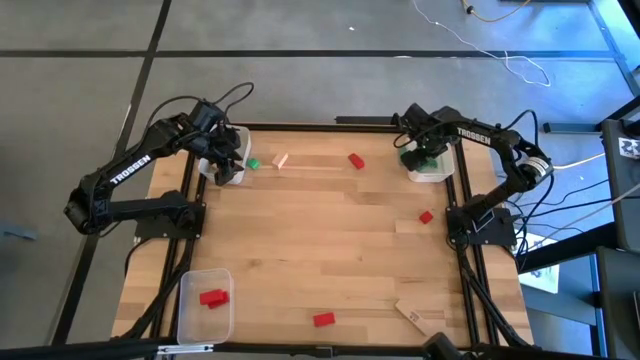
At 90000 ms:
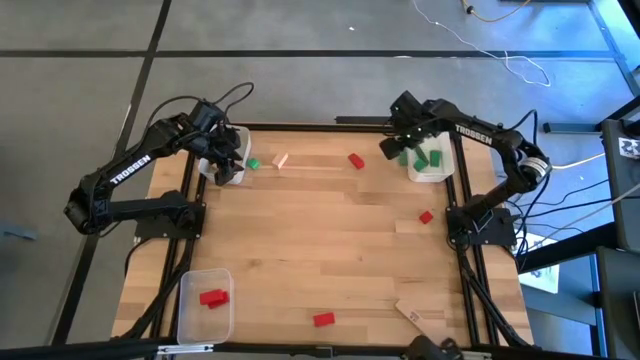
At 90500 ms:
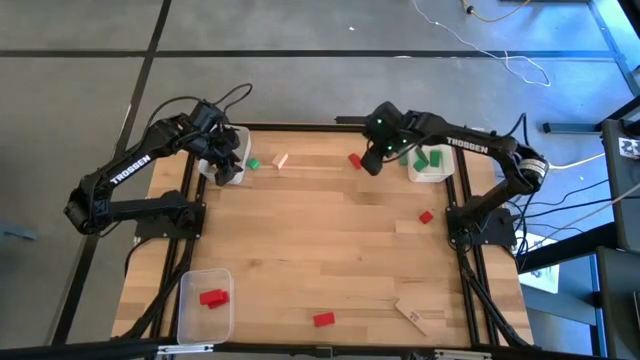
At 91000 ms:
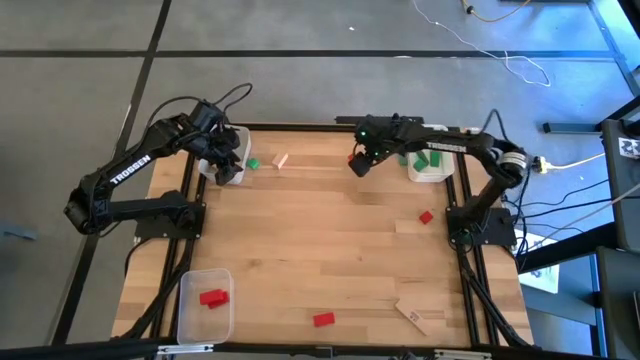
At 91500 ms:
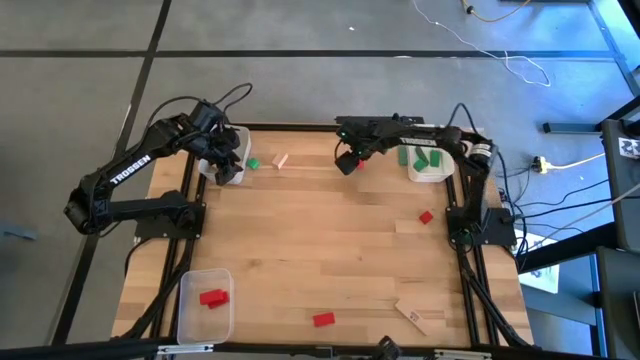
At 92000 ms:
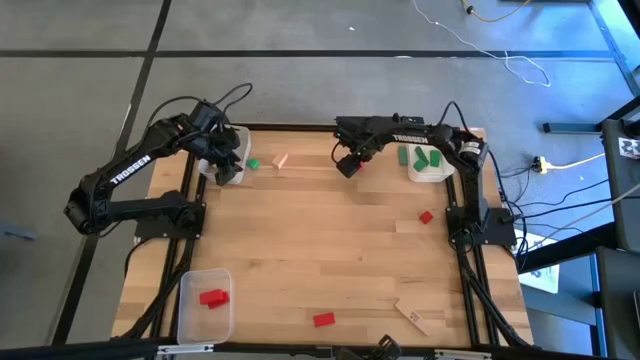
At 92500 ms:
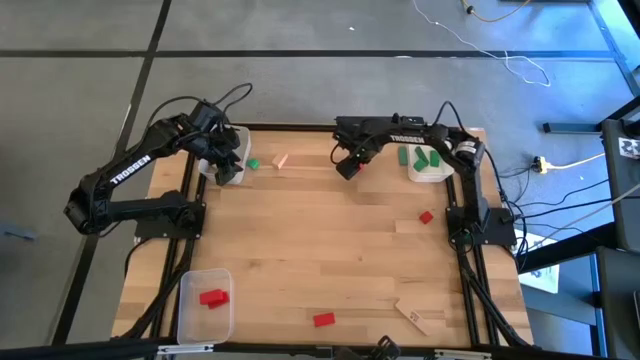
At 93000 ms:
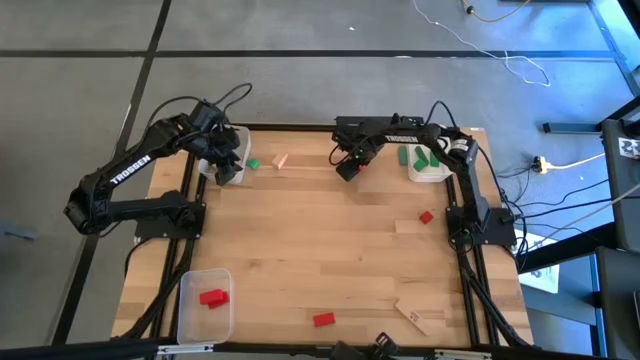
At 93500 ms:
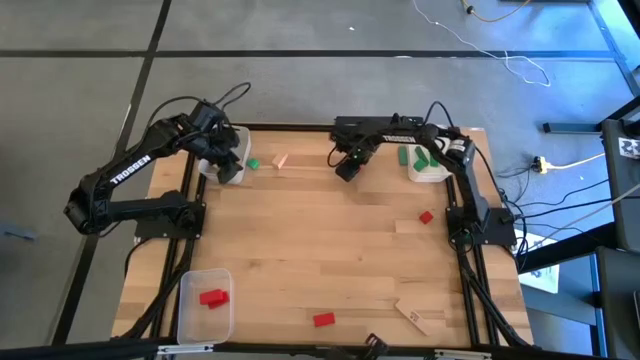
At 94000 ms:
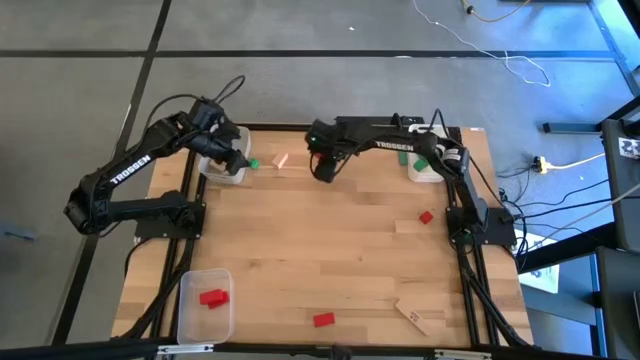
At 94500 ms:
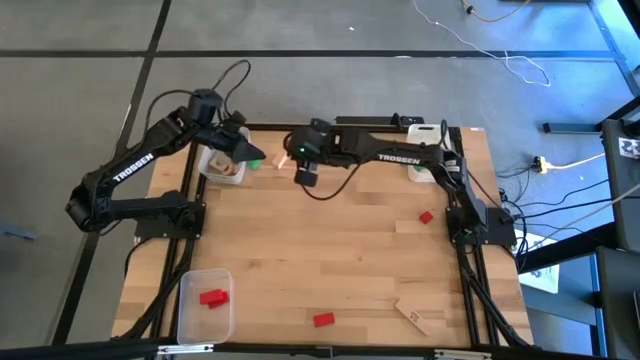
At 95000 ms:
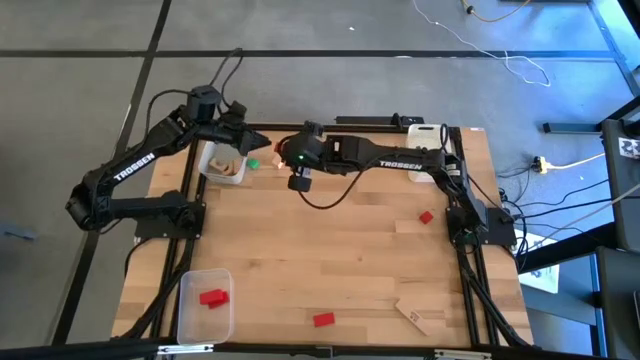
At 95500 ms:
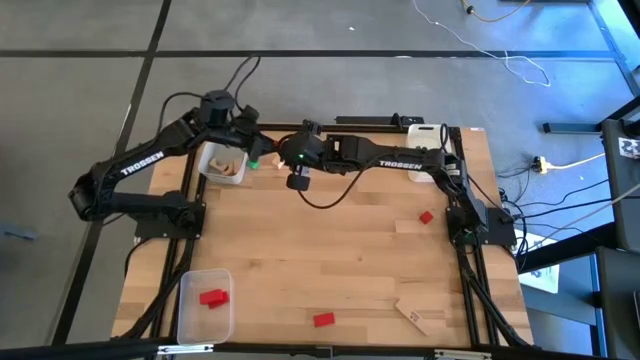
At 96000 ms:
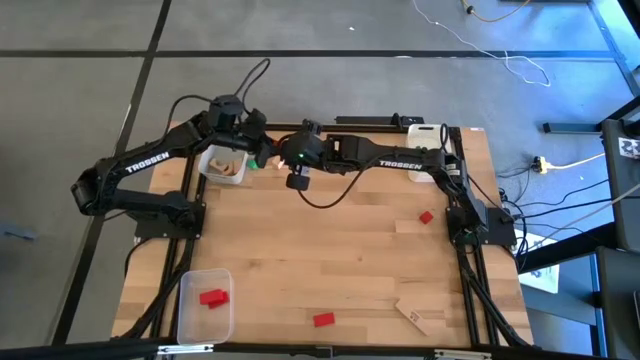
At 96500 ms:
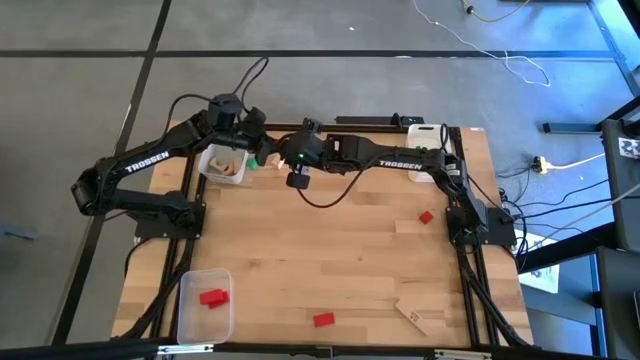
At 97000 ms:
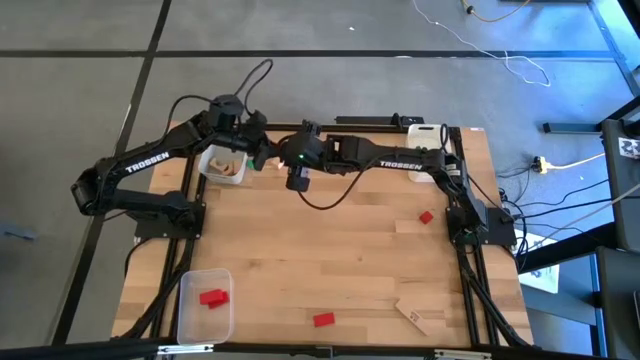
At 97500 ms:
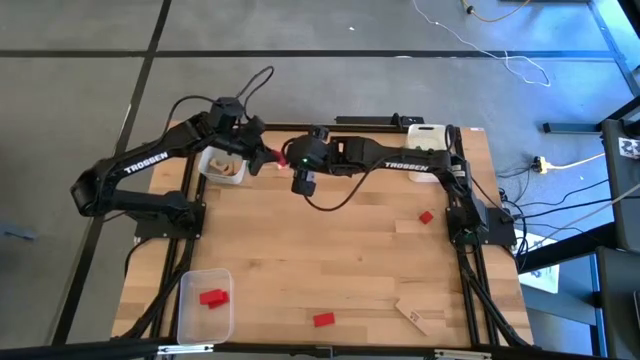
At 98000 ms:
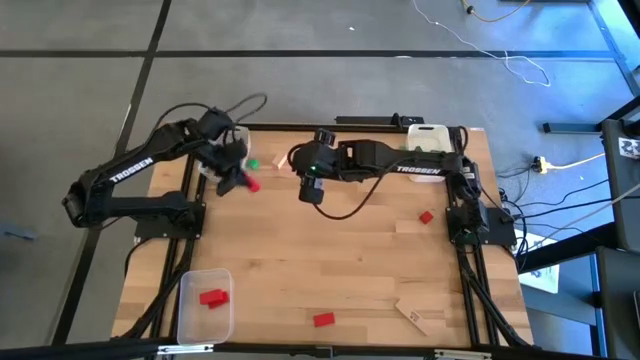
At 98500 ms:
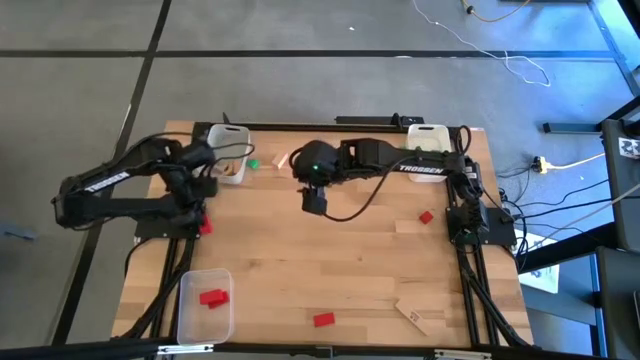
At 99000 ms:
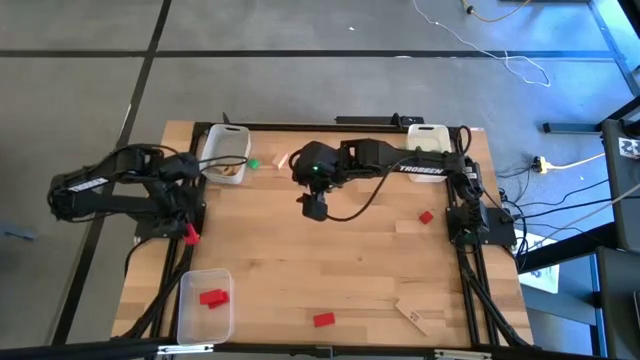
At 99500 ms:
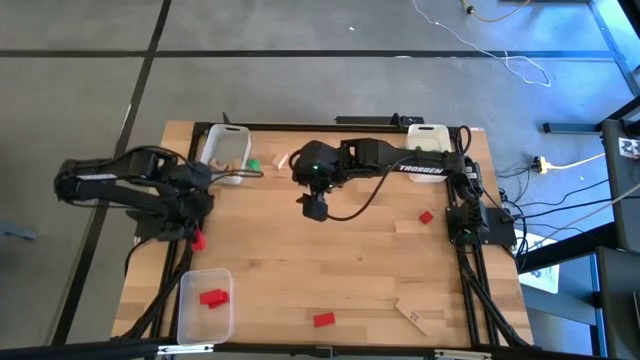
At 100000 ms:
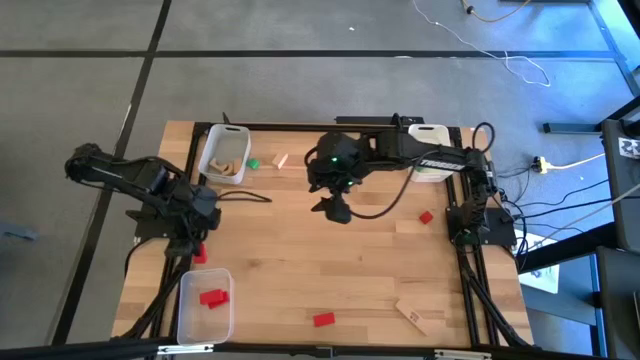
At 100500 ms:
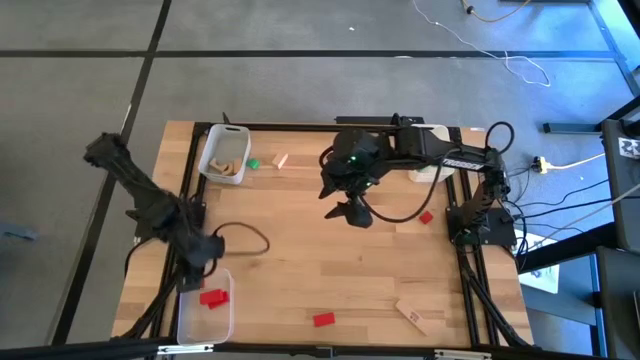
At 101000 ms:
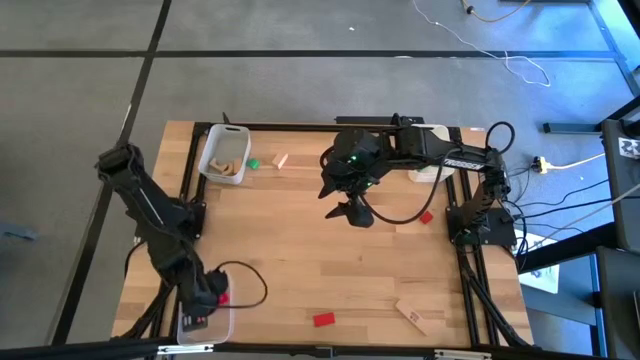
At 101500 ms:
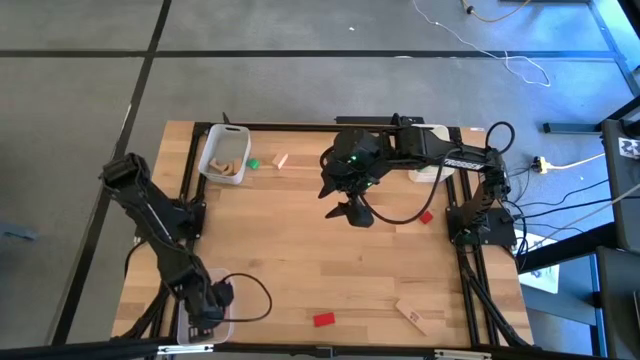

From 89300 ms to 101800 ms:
Task: Sort & place blocks by color
Put the red block into the transparent bin

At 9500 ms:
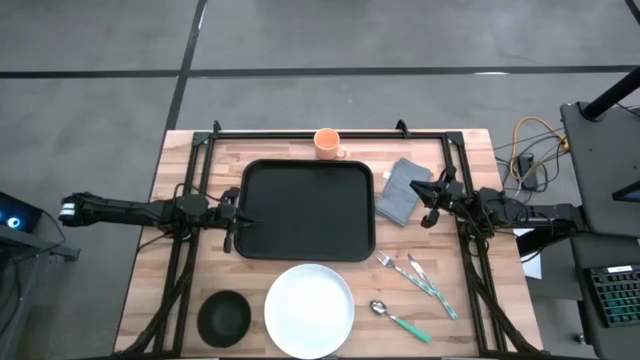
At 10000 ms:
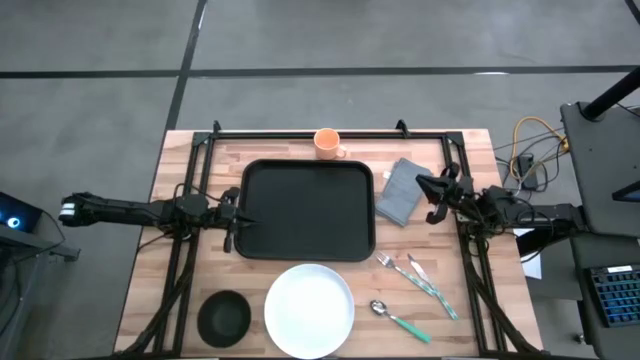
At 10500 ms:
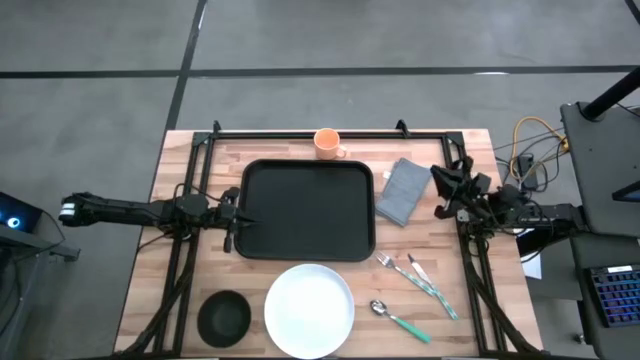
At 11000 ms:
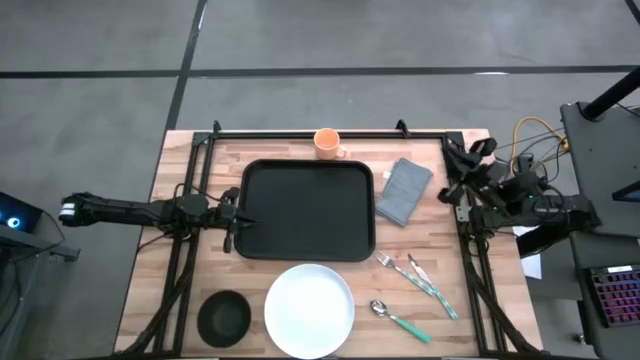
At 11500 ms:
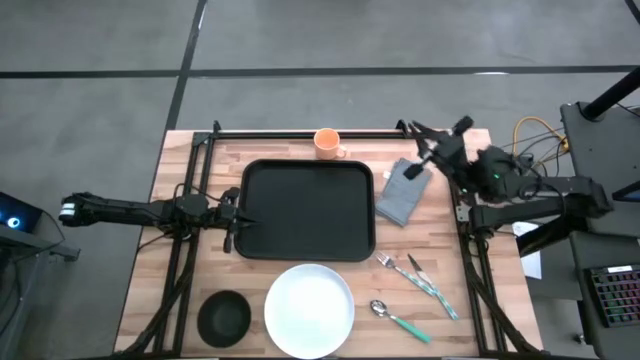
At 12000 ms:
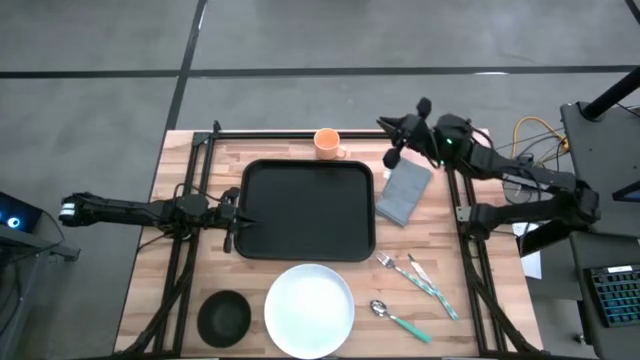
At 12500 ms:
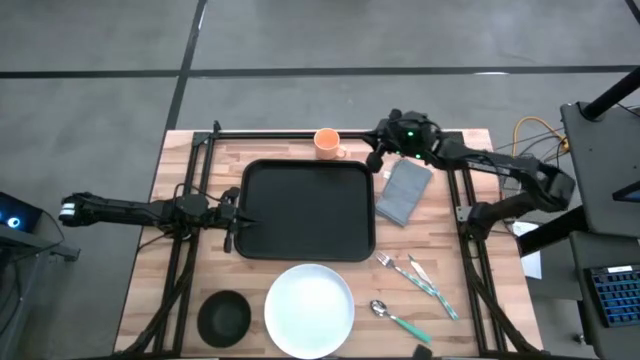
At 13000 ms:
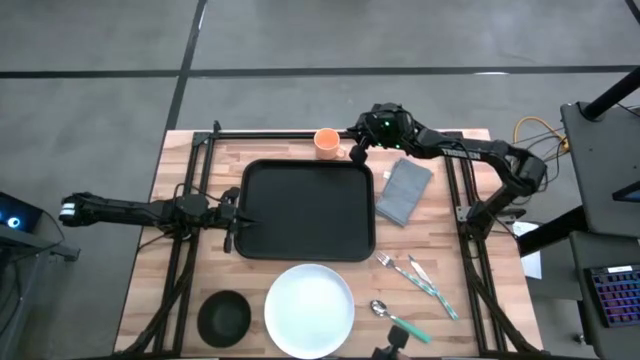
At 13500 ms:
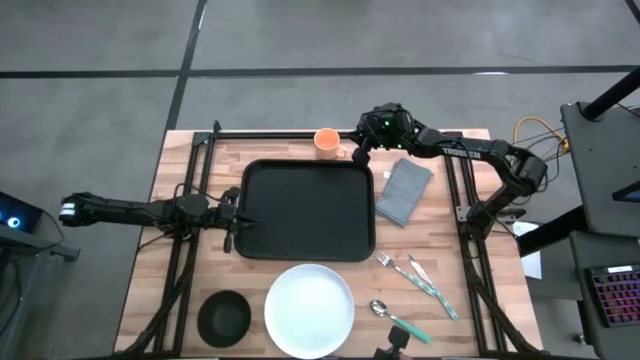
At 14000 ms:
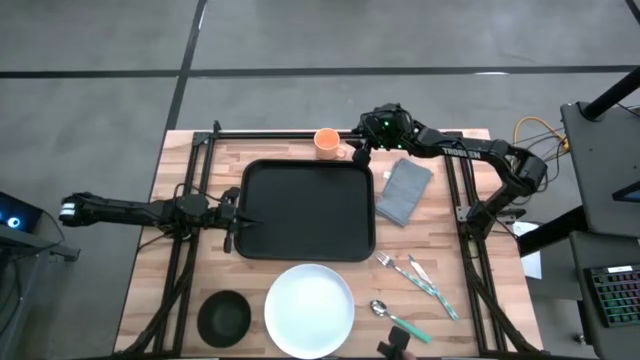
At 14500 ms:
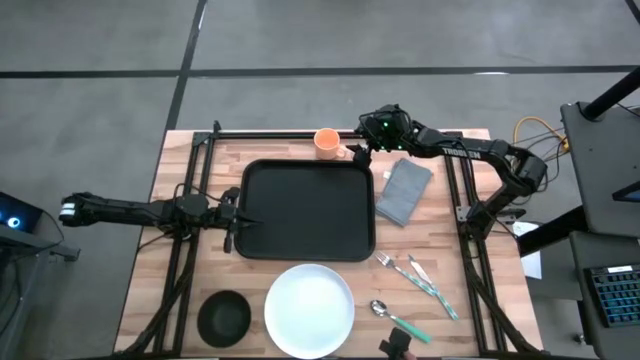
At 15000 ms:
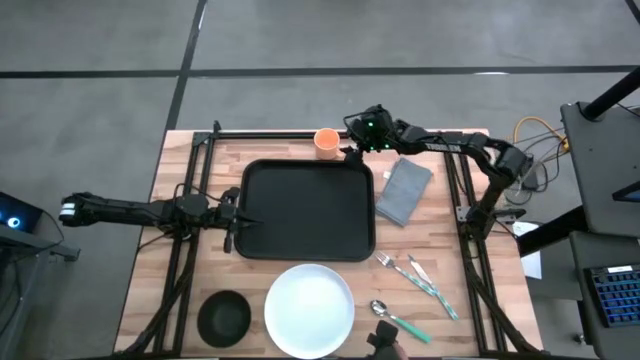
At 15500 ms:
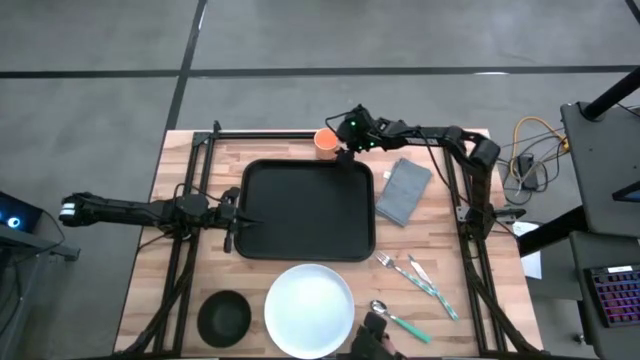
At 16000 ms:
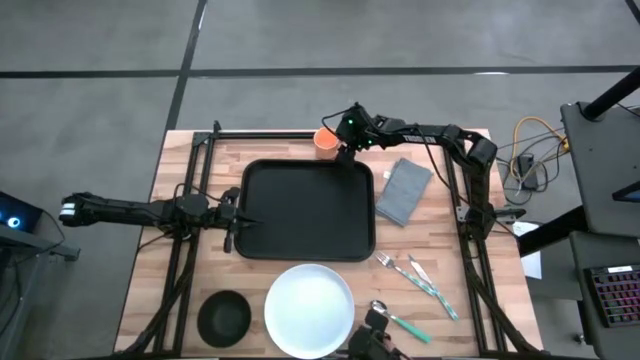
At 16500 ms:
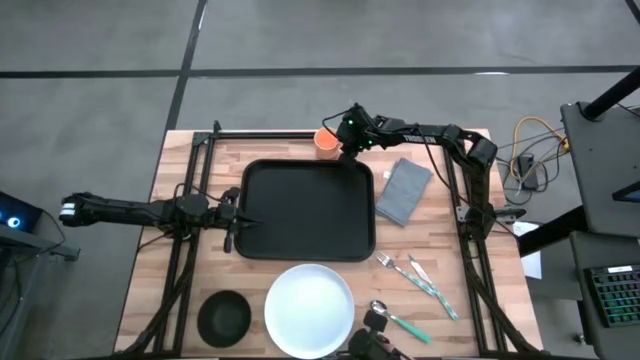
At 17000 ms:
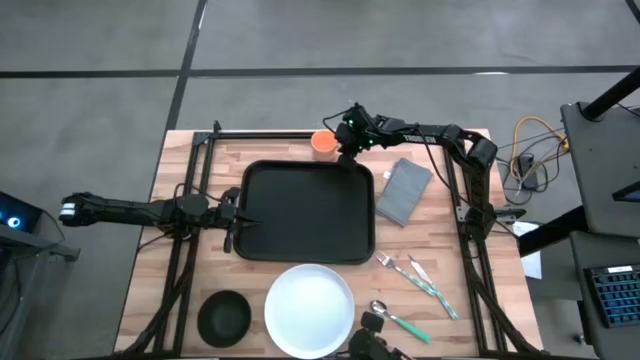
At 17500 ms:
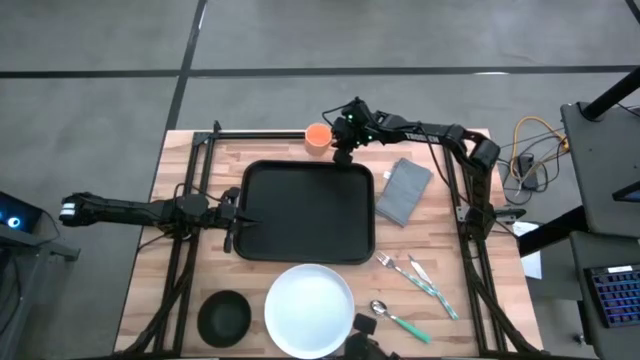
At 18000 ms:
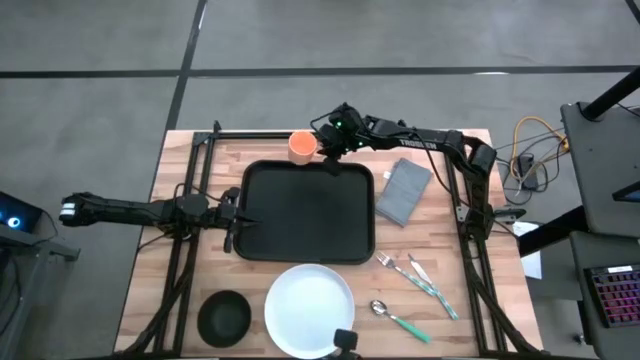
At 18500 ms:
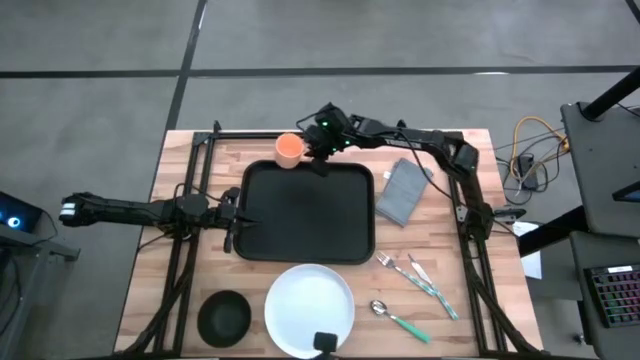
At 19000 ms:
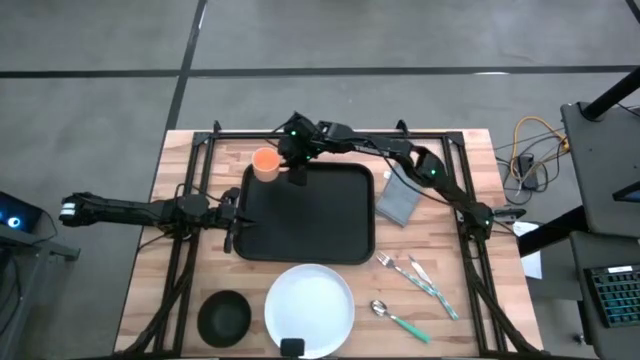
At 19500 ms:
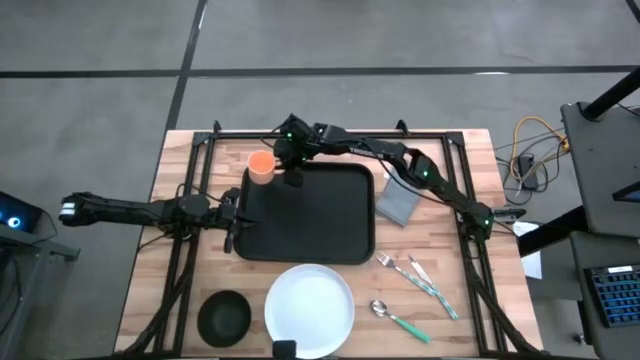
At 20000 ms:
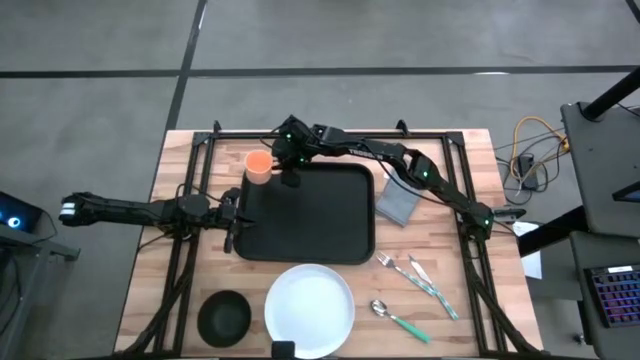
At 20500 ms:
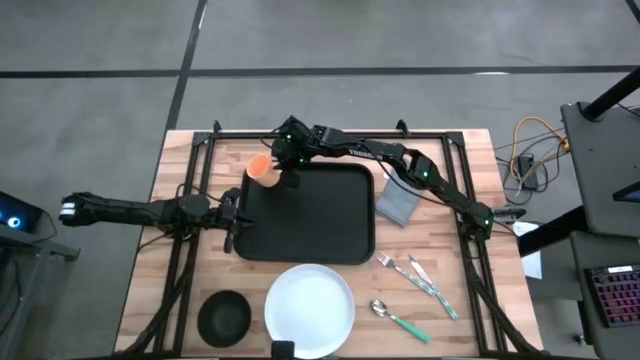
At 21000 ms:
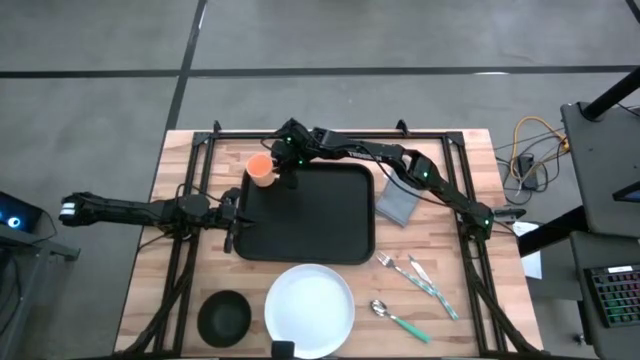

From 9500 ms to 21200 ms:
Task: Set up tray
Put the yellow mug on the top left of the black tray
